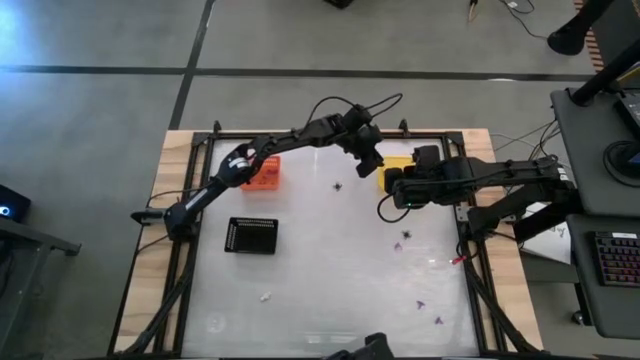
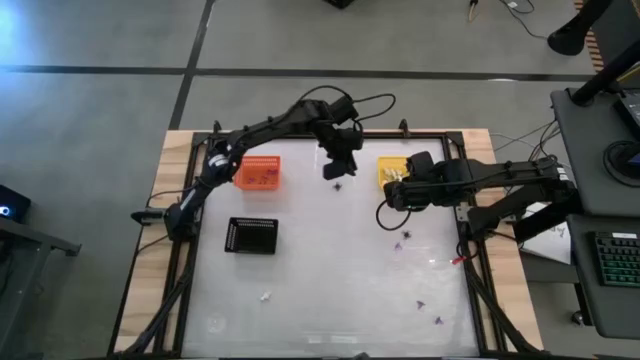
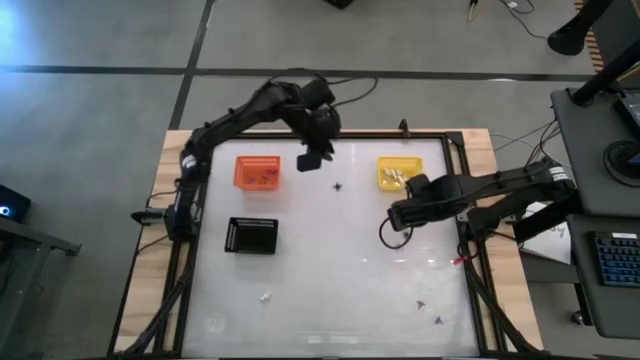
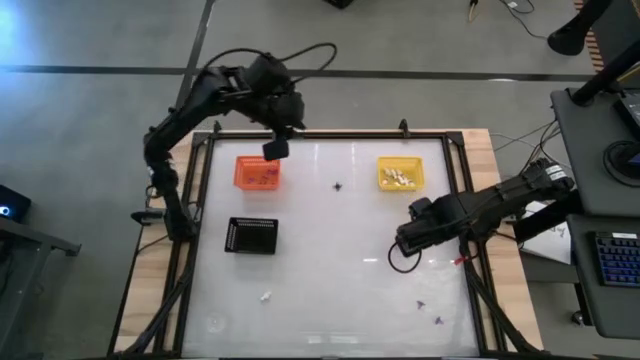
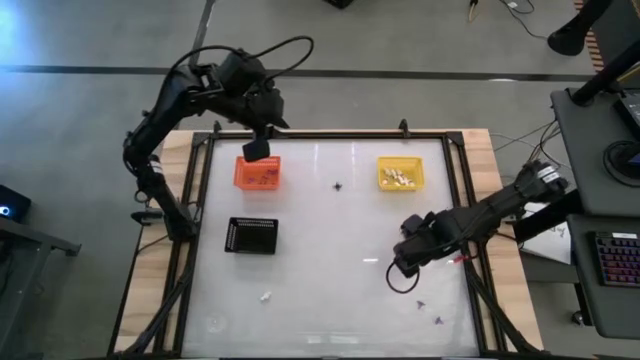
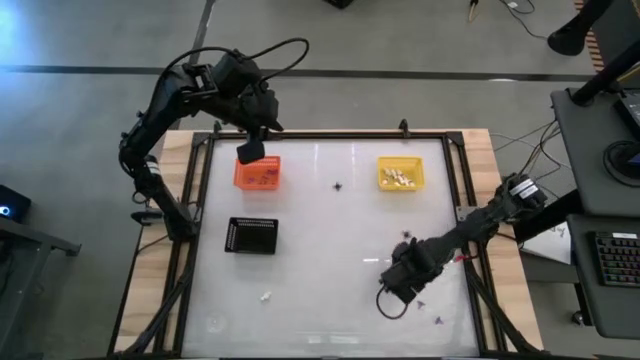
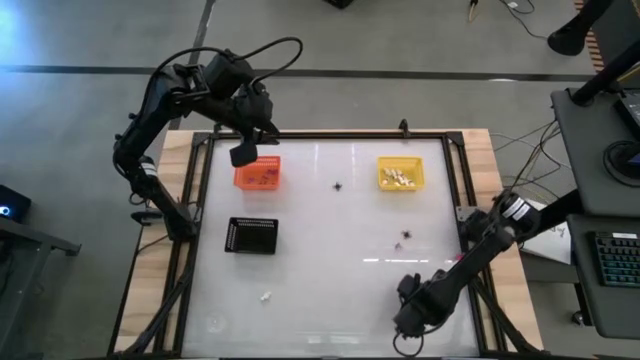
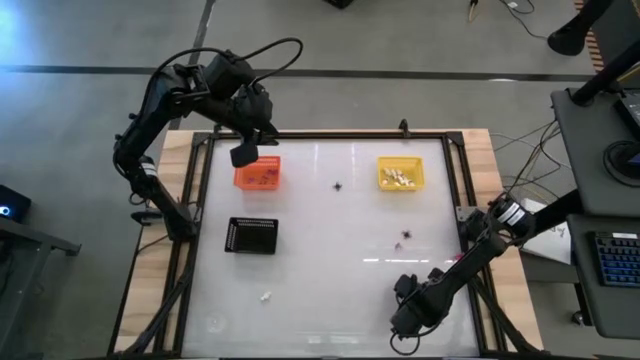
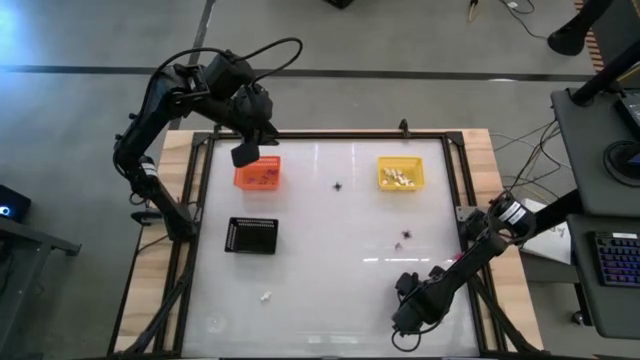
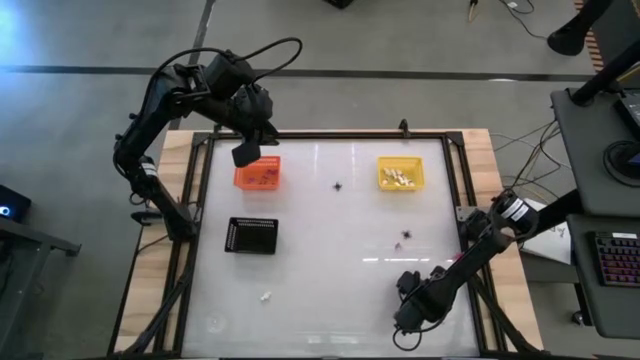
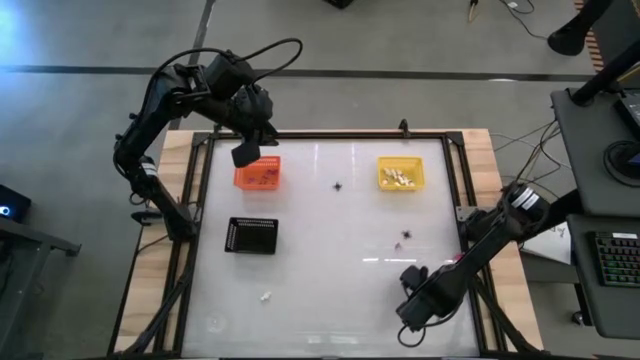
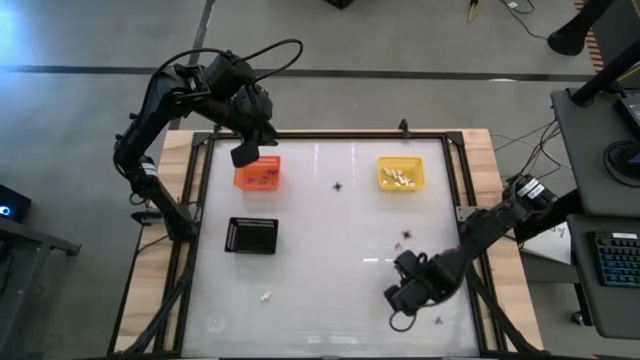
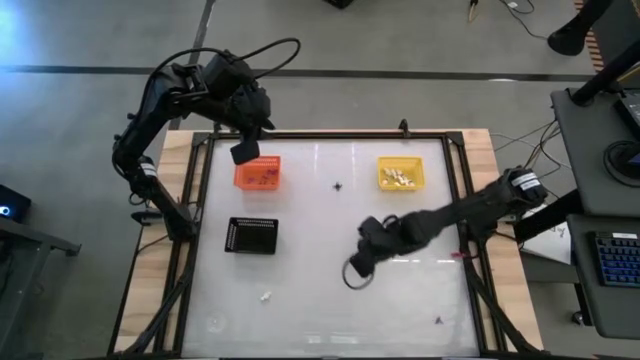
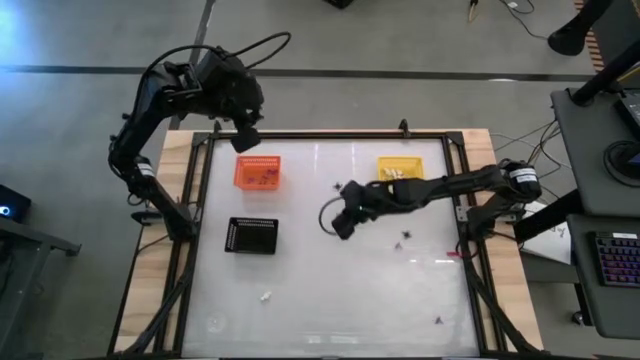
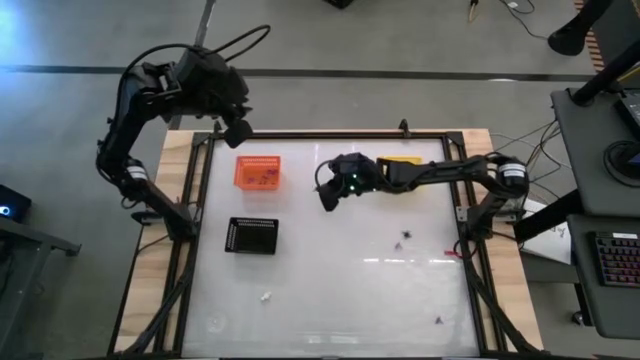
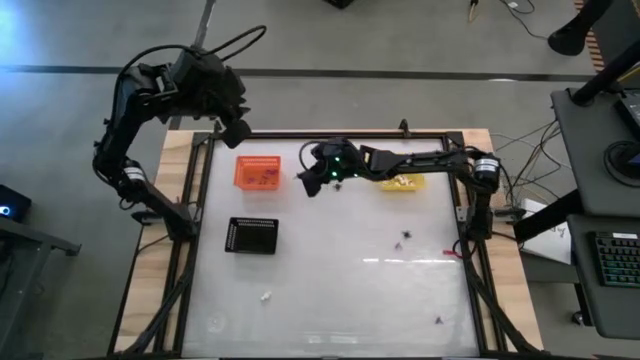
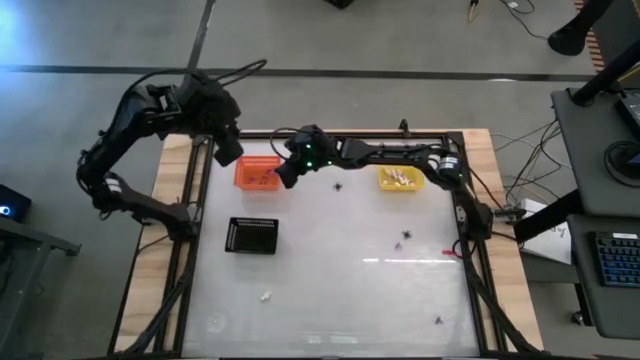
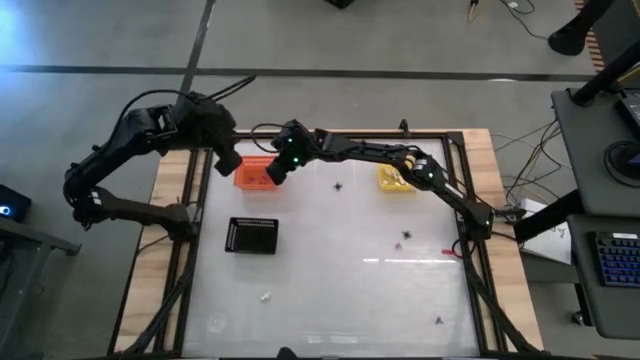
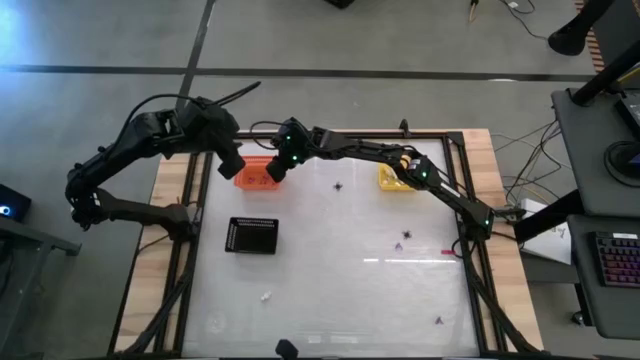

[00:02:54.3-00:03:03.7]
Task: Sort Halloween decoration
Put the violet witch hat toy into the orange bin

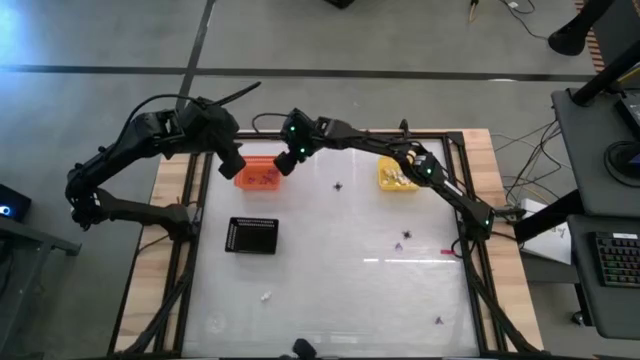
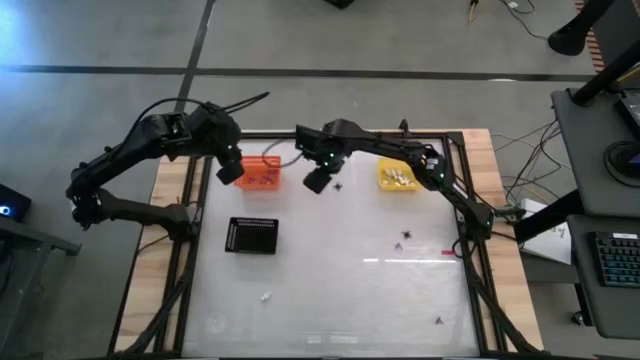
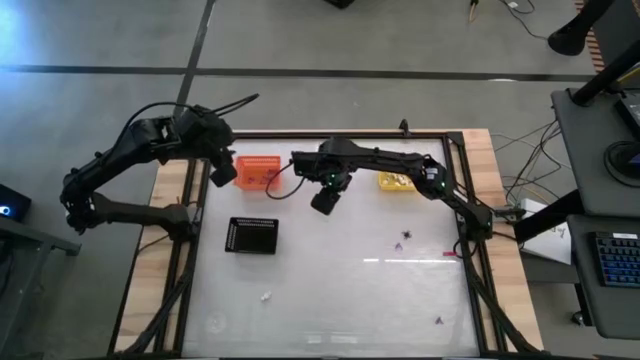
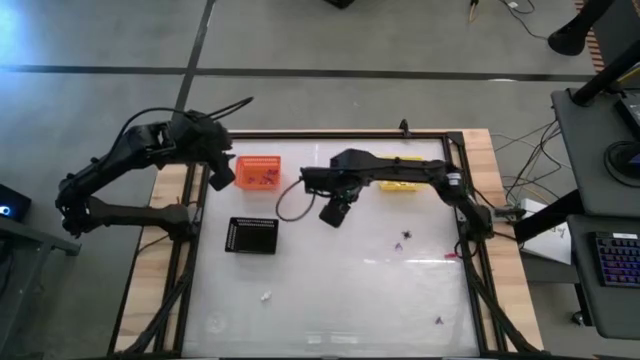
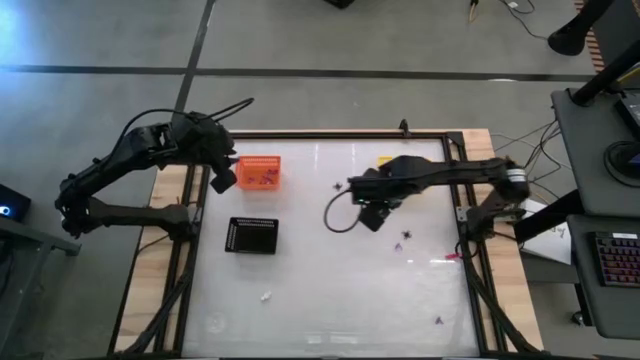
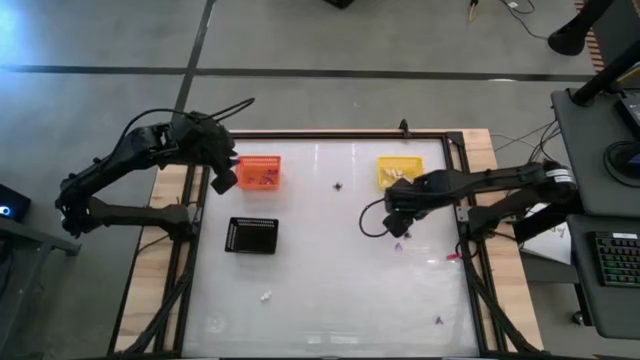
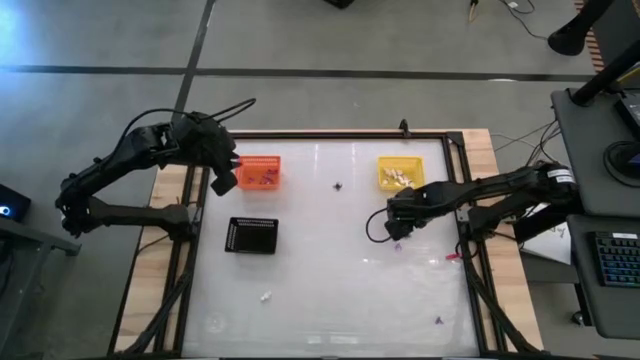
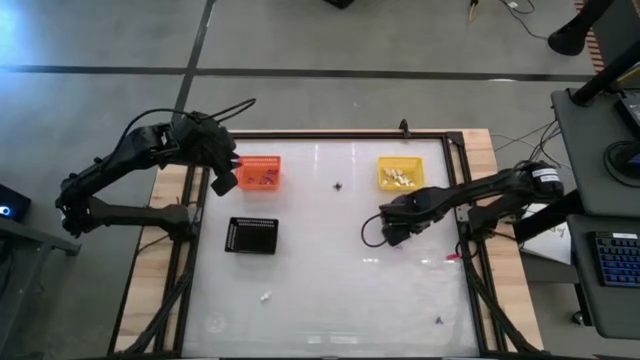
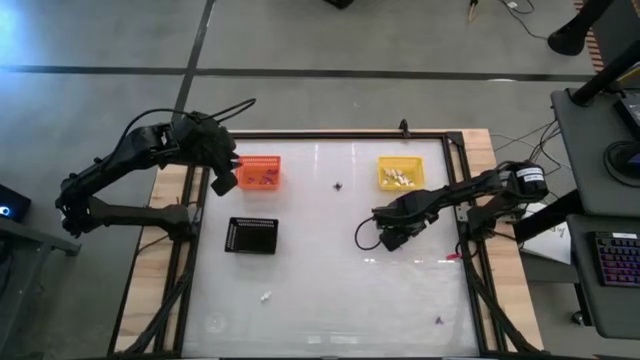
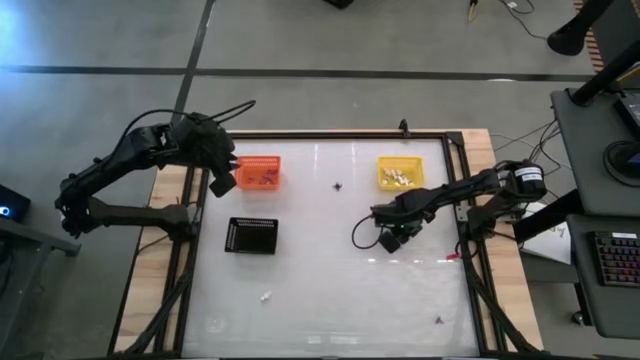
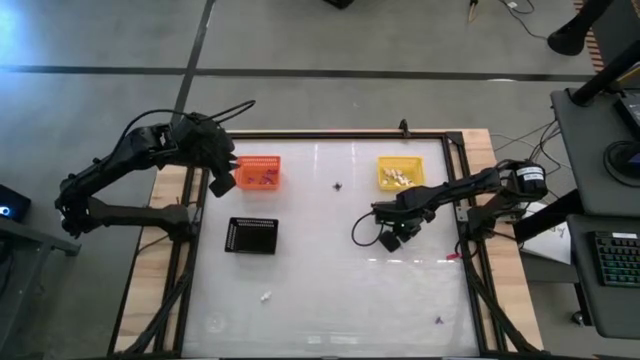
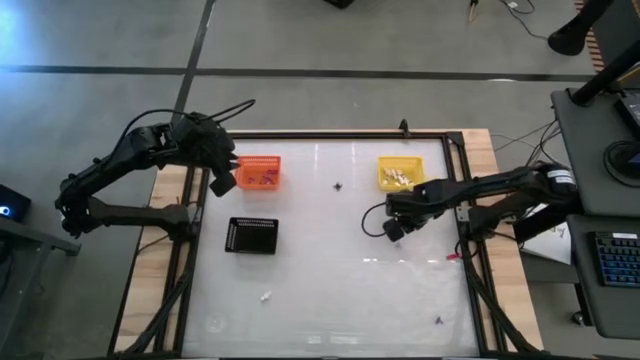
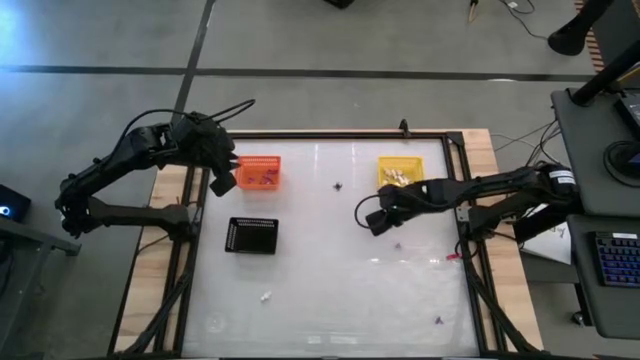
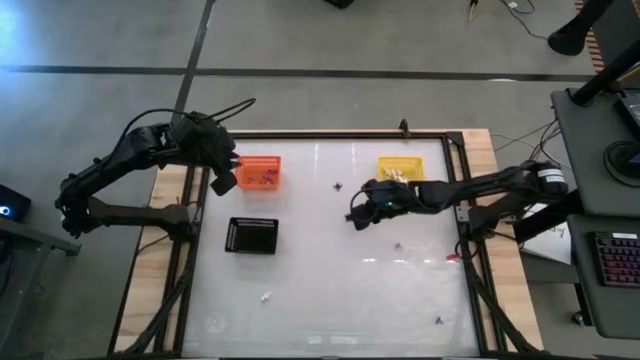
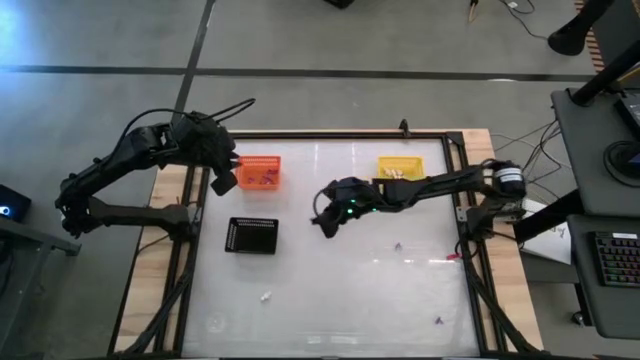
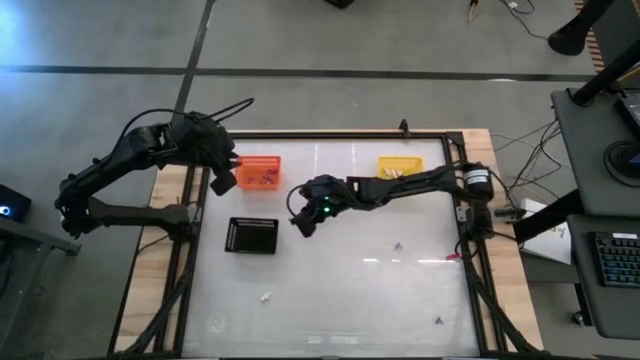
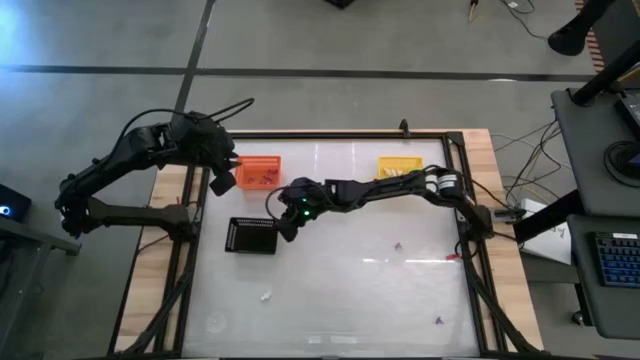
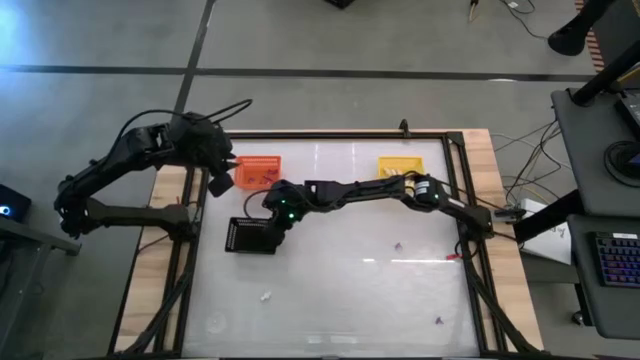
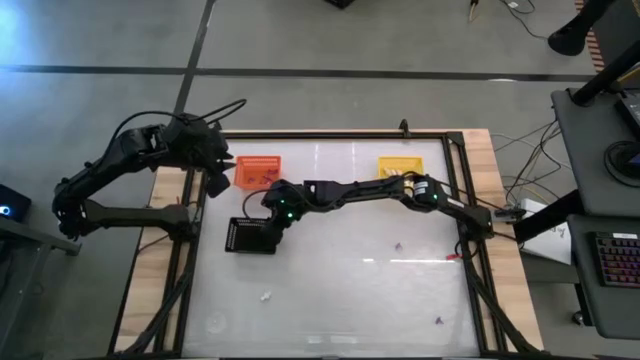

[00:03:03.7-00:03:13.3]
Put the black spider toy into the black bin

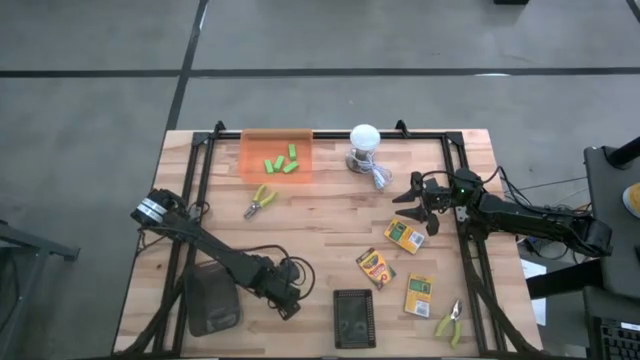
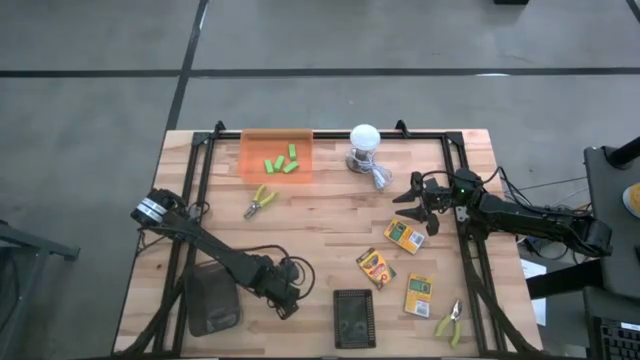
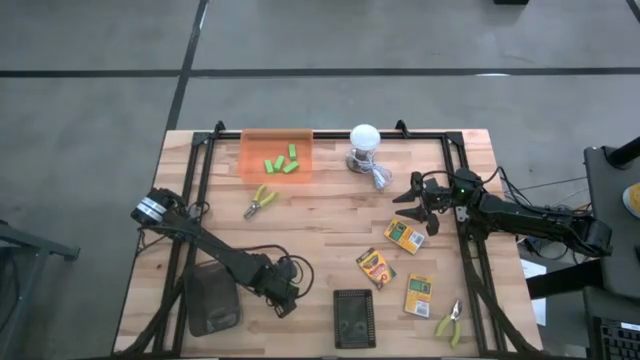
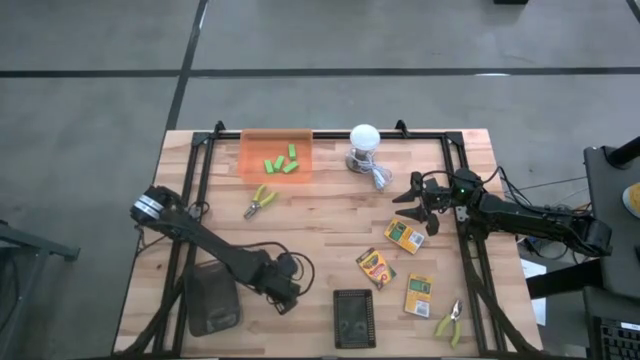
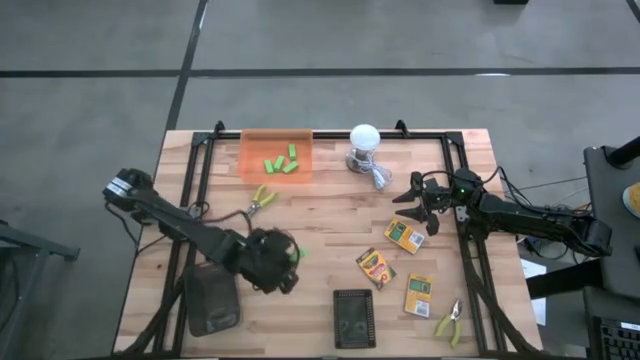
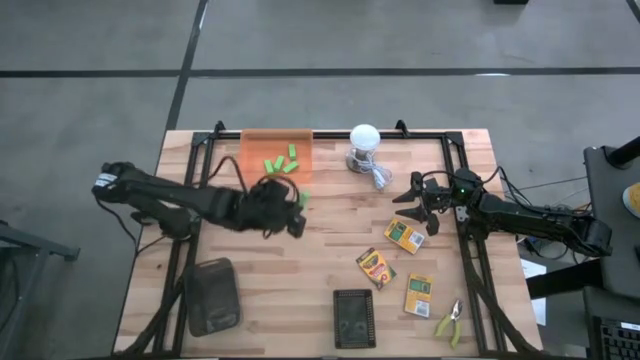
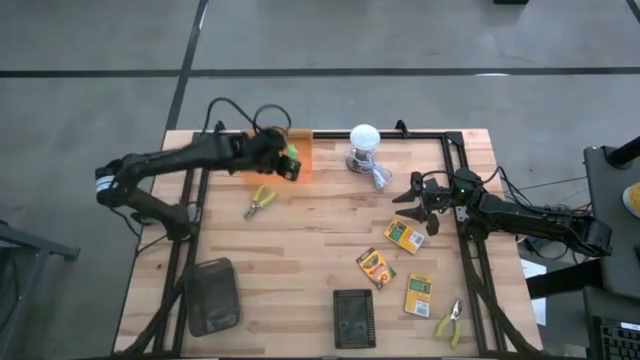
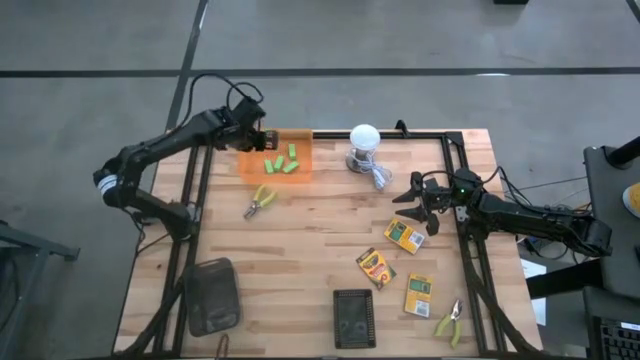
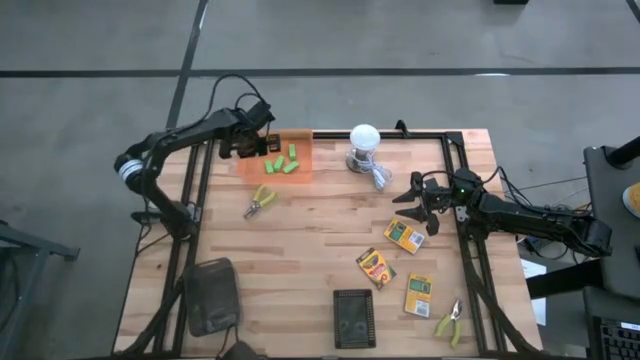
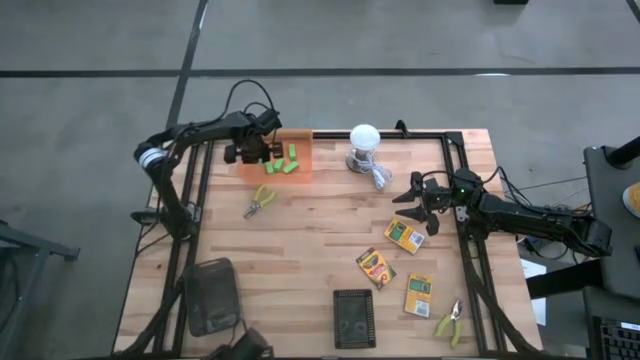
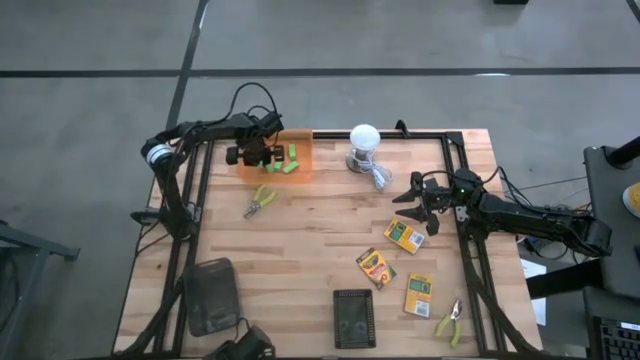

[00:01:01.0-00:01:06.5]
Task: Pick & Place School Supplies
Put the green eraser into the orange bin
